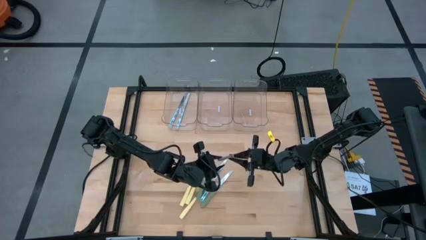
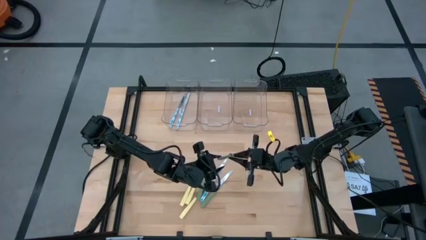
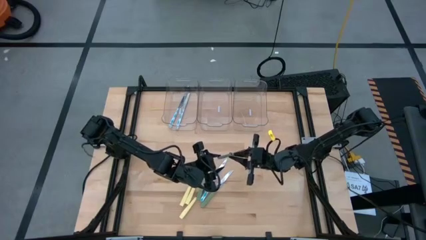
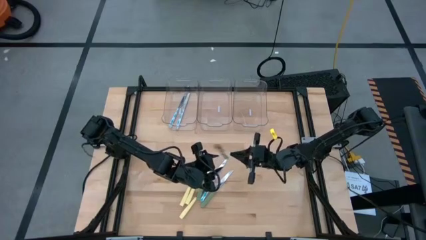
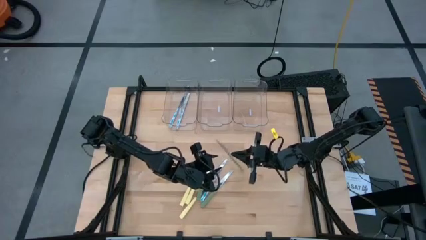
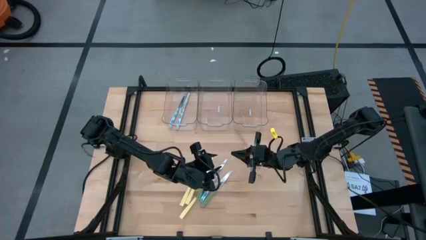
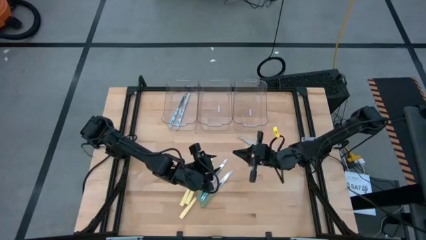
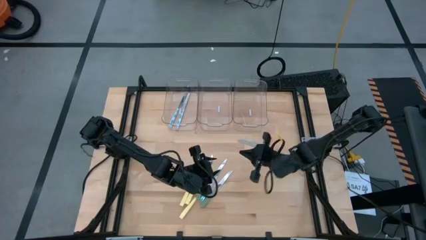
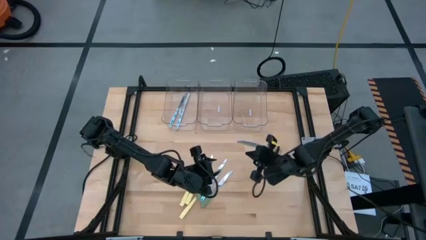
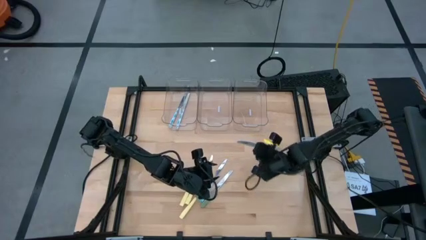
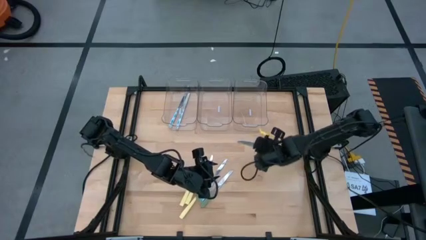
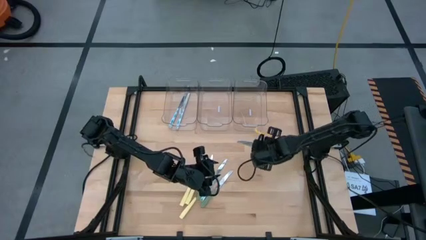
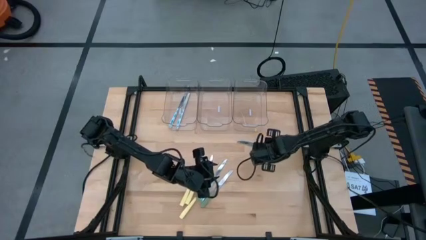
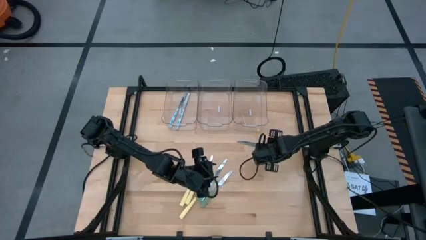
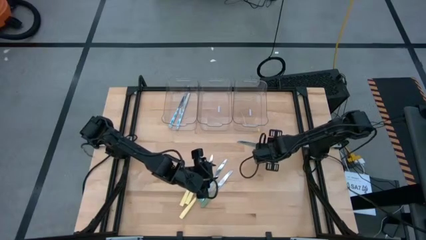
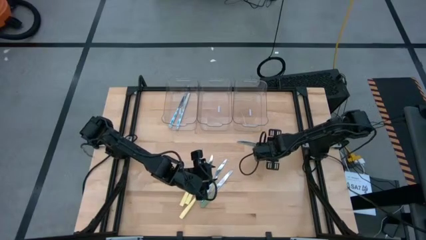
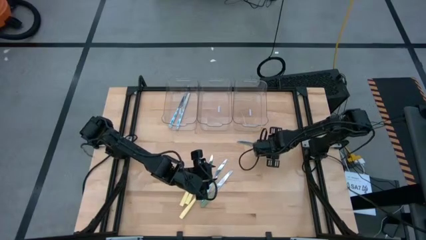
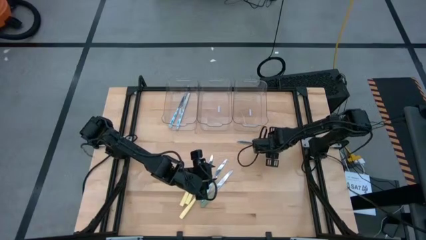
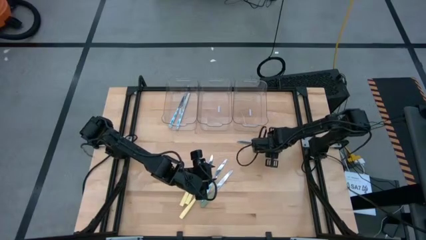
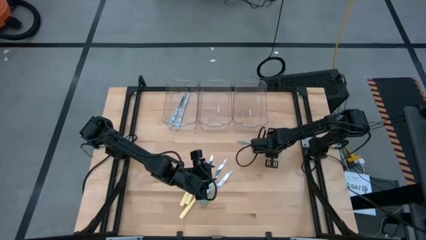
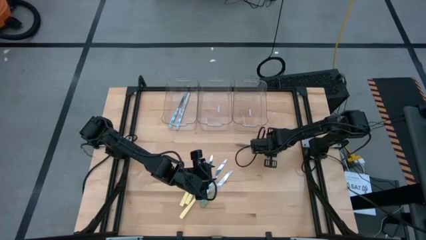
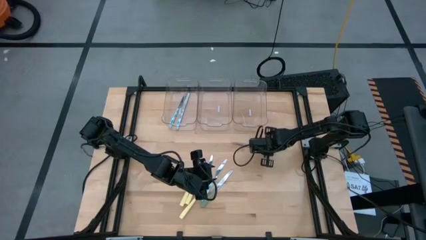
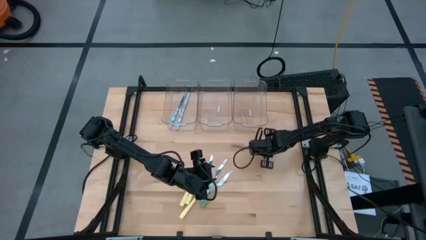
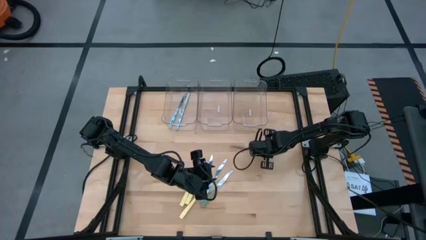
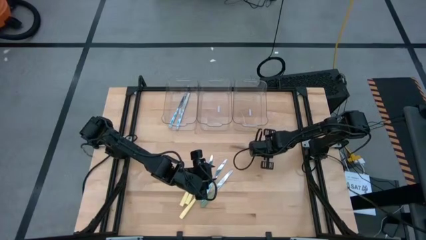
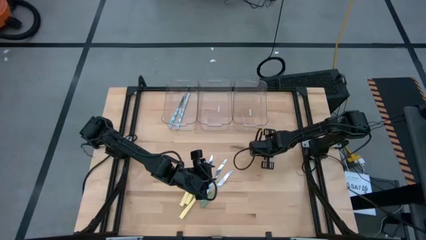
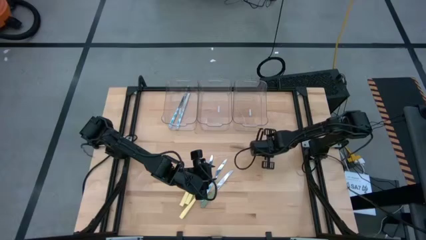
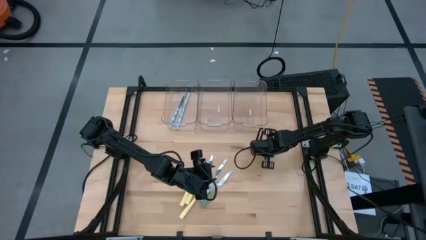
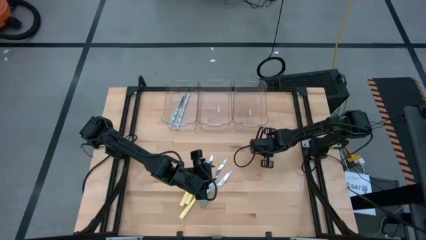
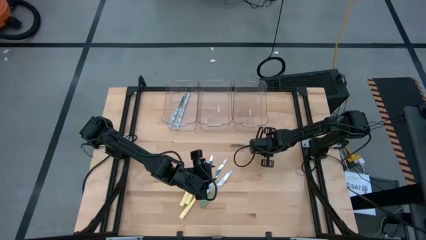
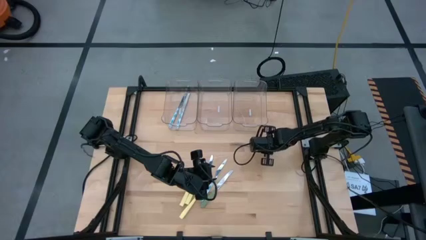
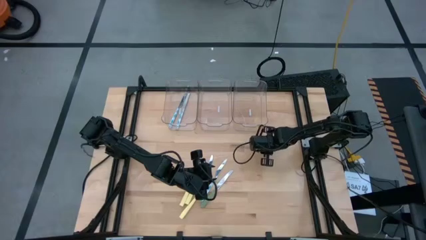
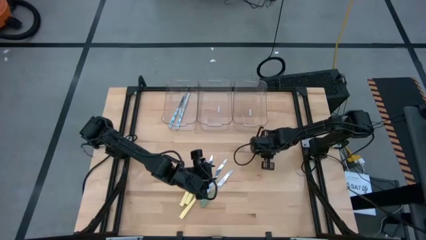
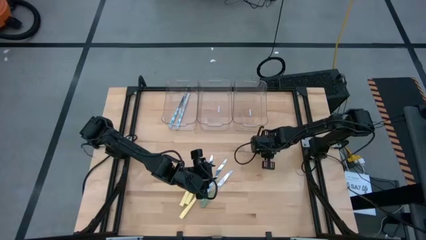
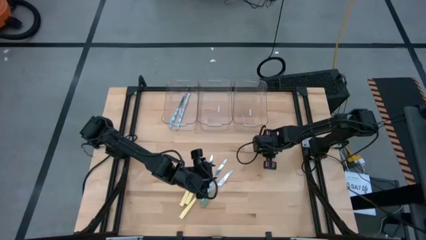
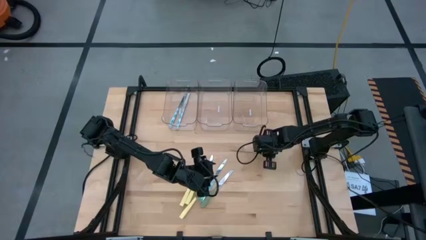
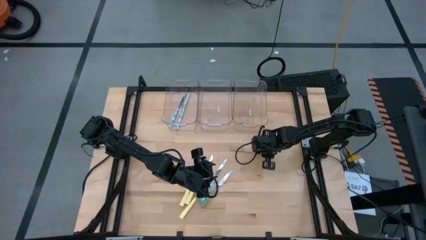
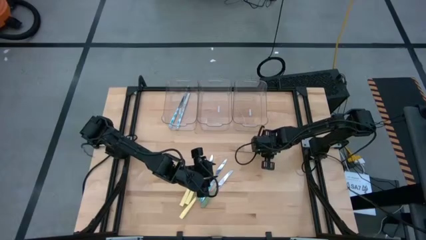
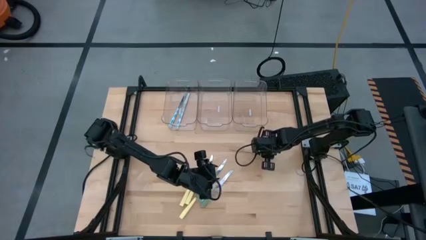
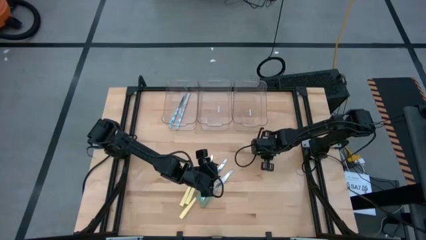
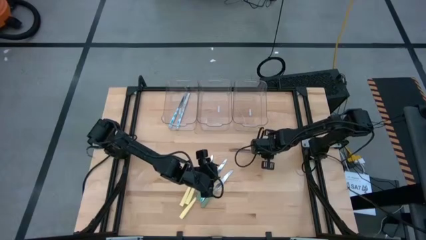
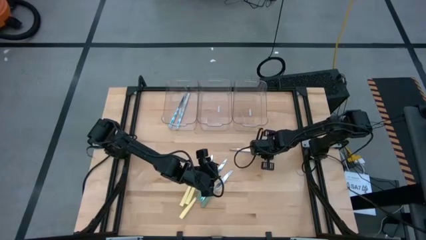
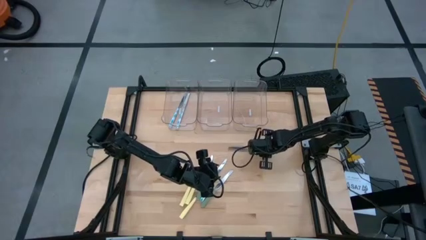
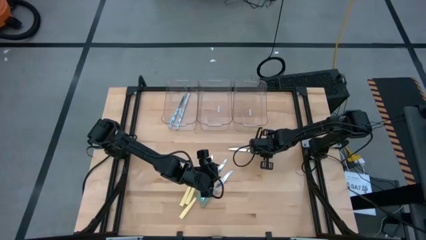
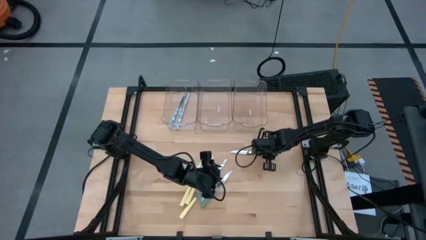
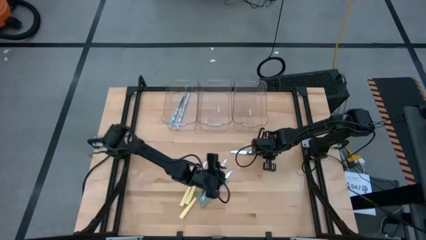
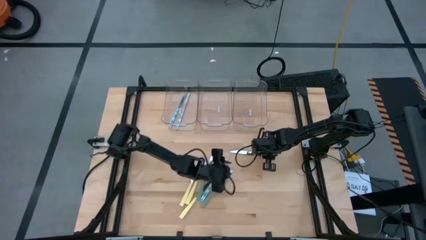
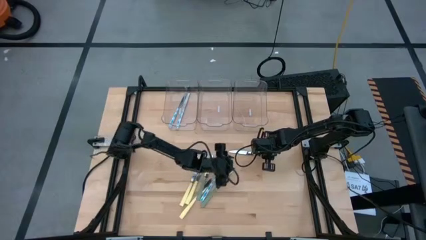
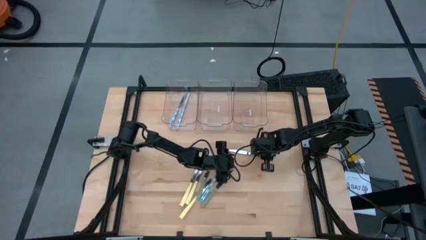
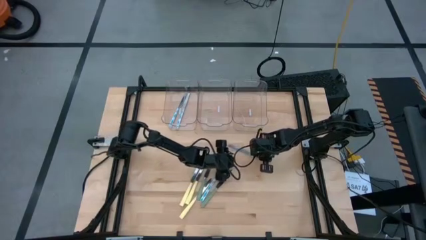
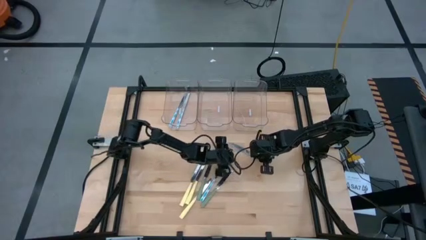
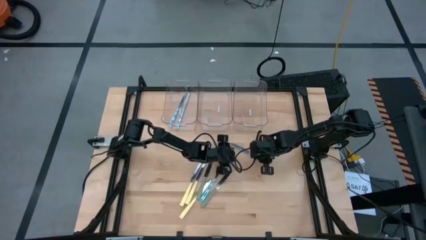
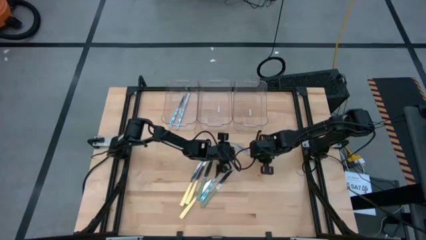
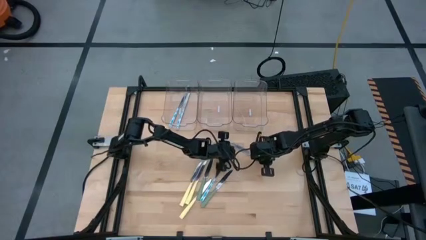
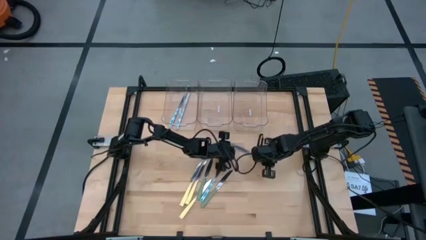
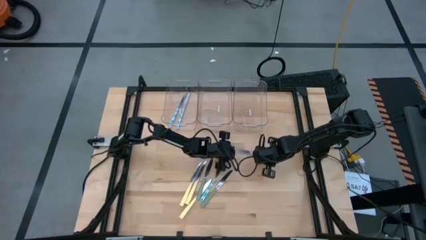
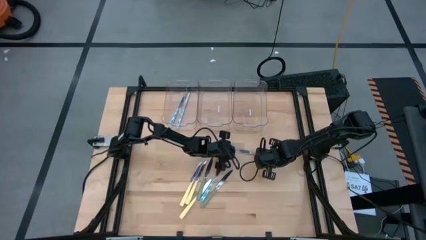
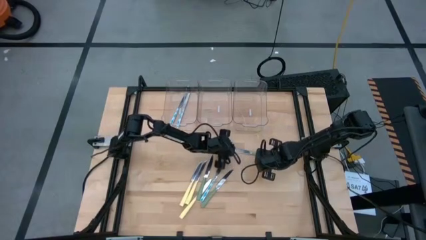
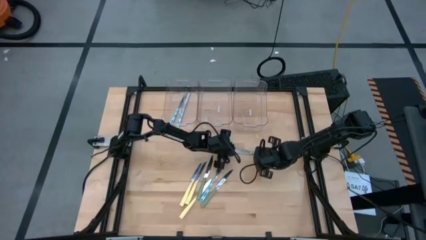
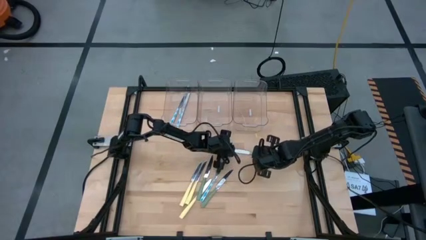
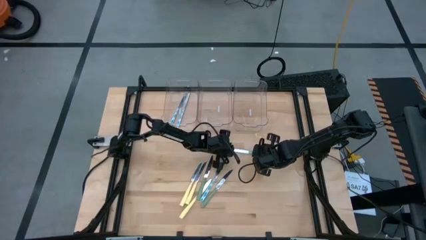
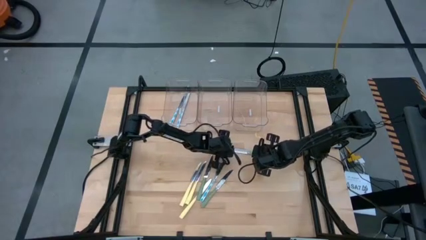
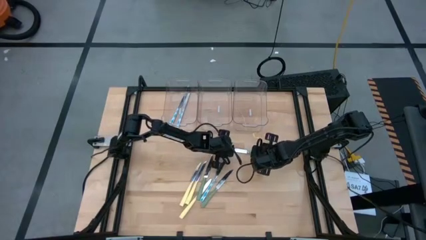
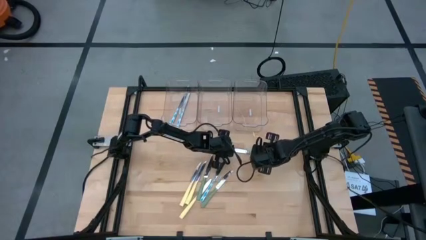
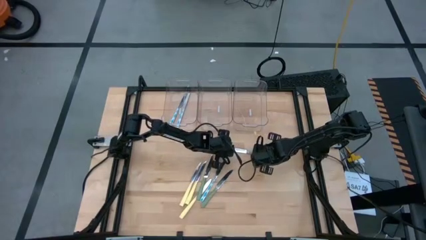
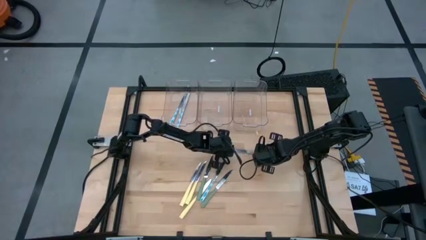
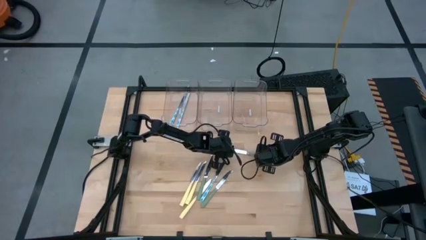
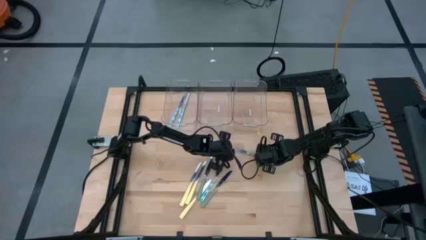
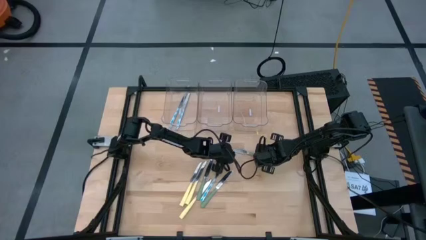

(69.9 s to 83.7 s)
Task: Sort silverware by color (type)
Put the green knife into the right transparent bin

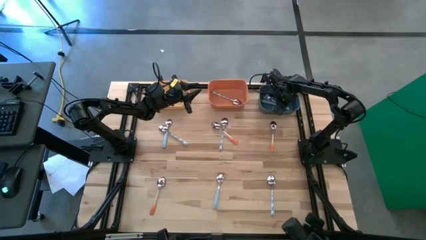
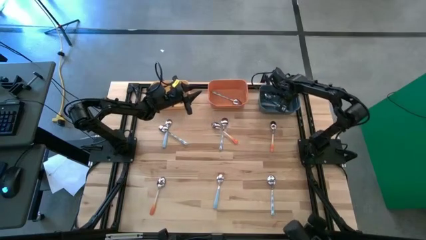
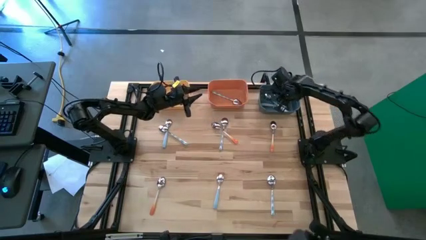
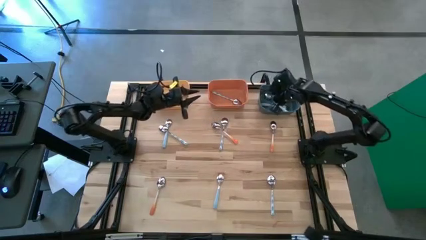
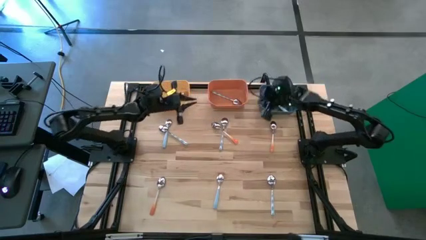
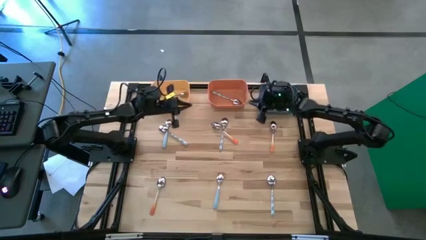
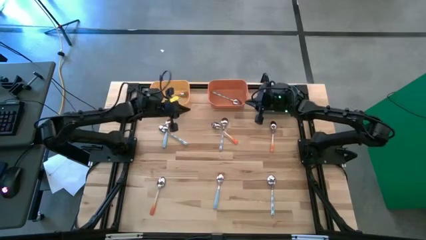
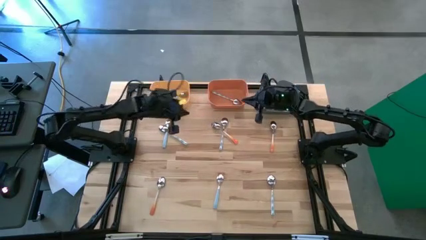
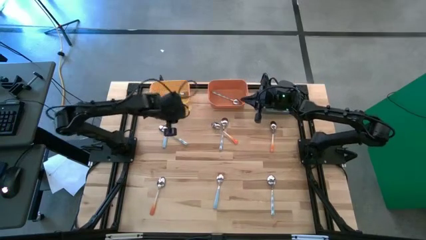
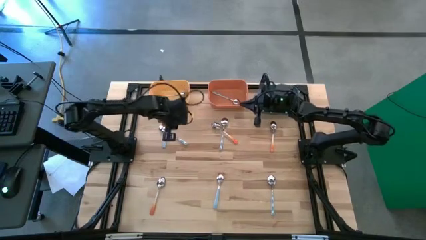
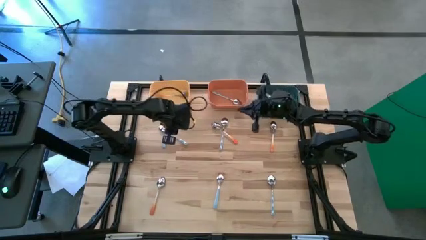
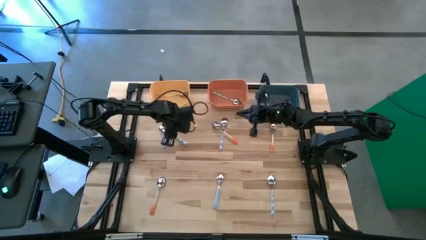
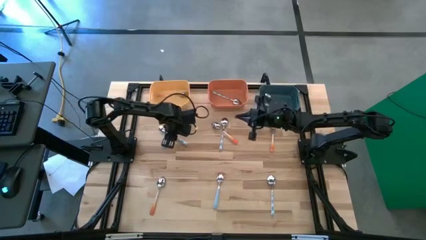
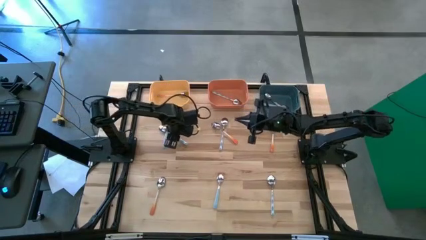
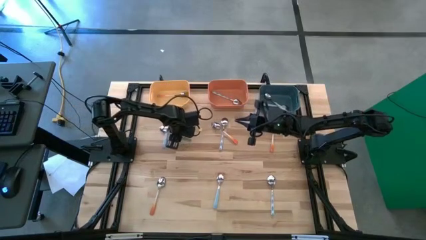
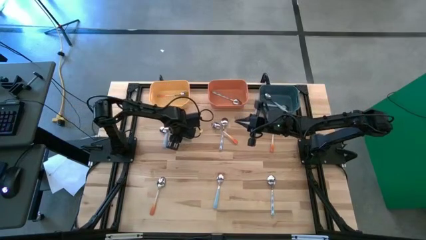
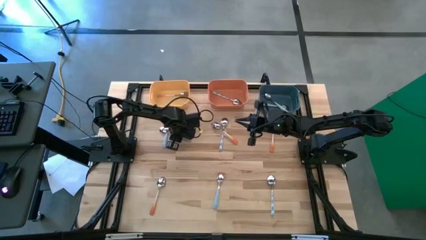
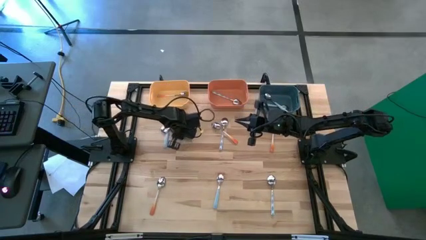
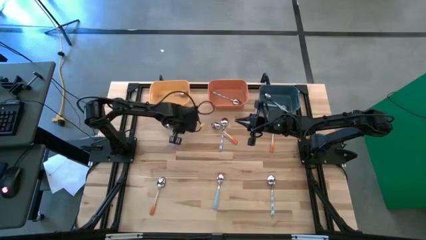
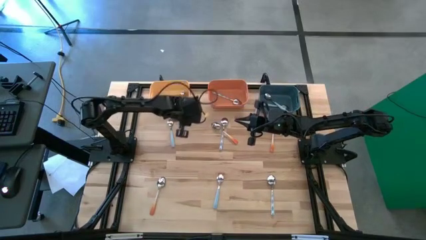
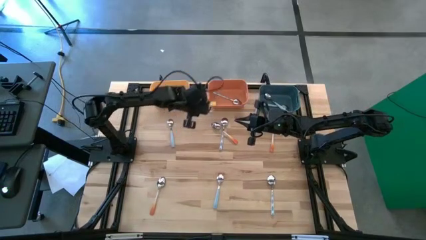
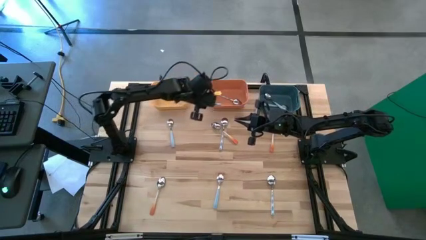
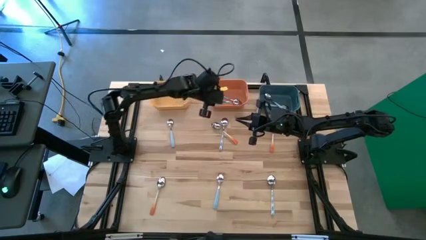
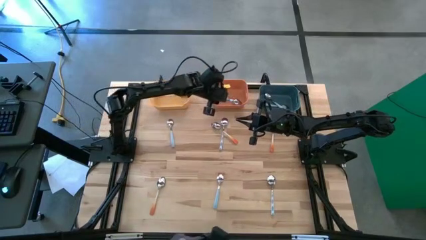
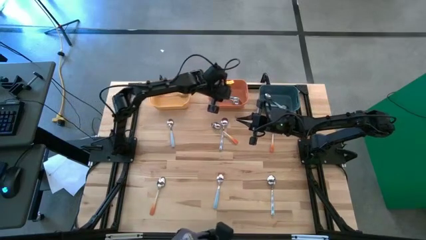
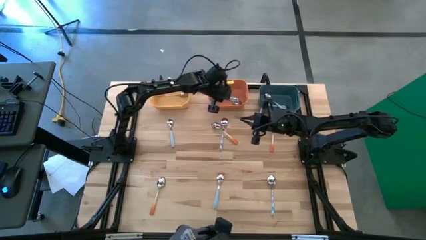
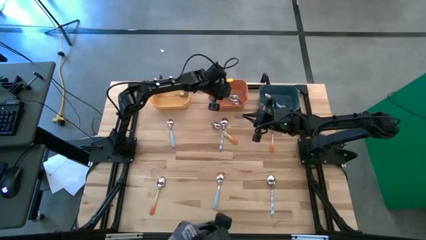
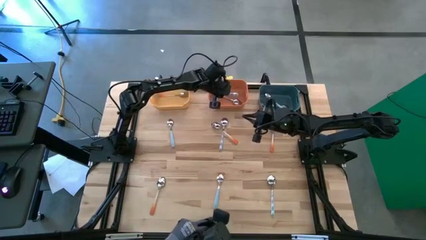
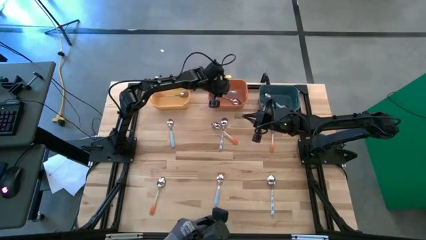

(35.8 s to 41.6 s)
Task: Sort silverware by color (type)
Put the white spoon into the orange bin
